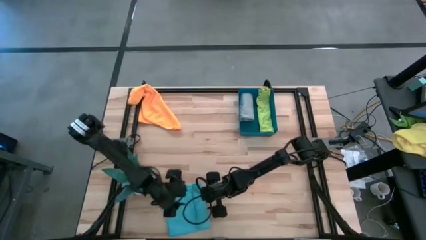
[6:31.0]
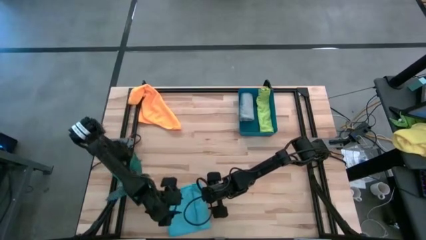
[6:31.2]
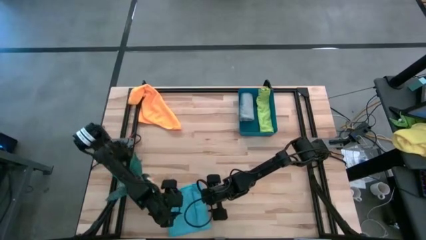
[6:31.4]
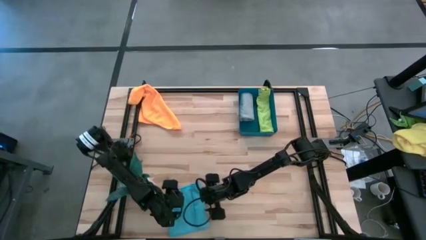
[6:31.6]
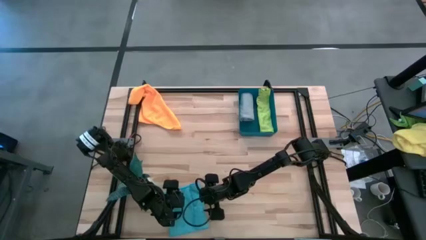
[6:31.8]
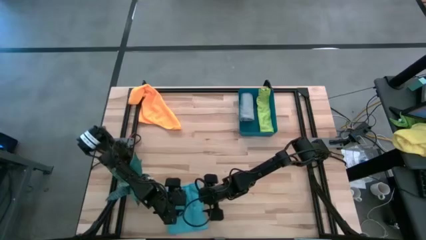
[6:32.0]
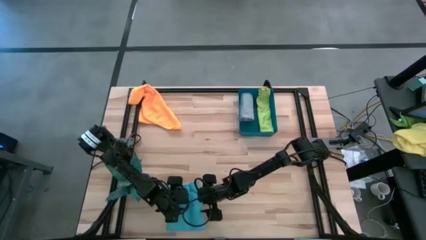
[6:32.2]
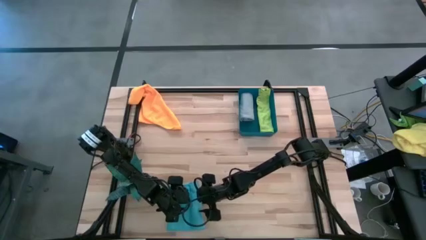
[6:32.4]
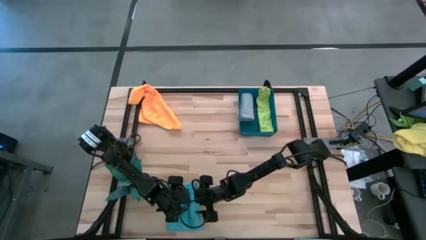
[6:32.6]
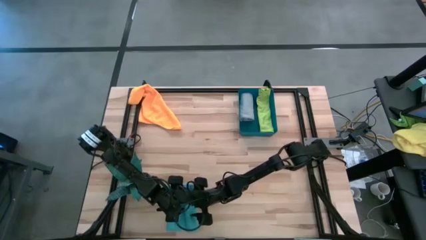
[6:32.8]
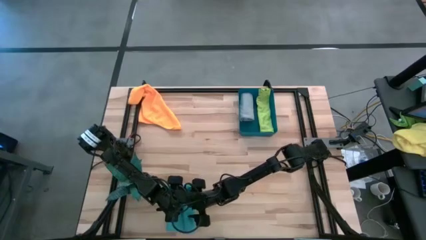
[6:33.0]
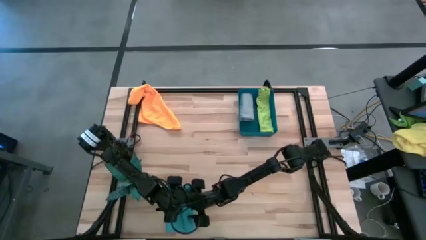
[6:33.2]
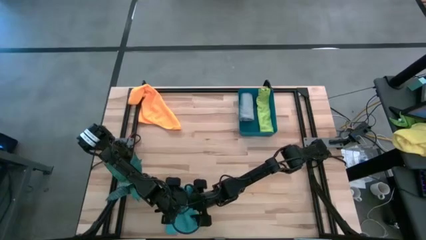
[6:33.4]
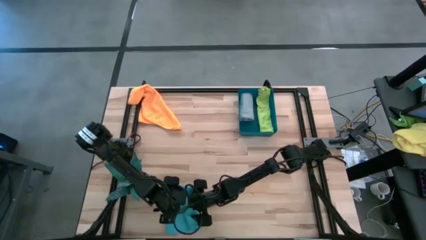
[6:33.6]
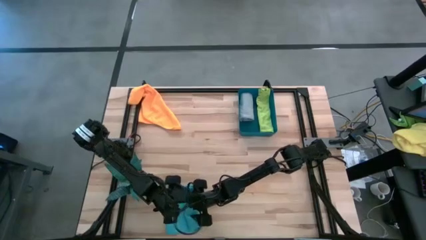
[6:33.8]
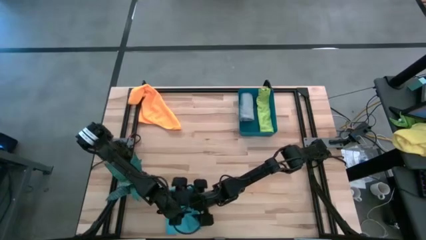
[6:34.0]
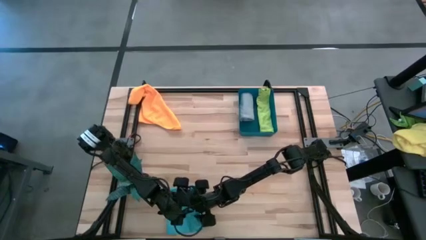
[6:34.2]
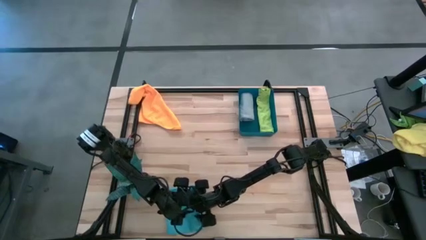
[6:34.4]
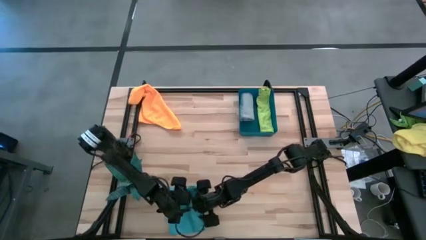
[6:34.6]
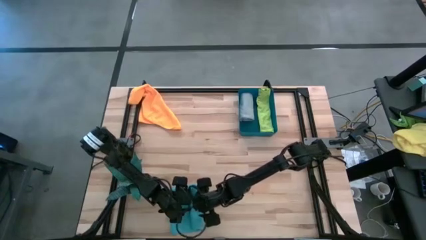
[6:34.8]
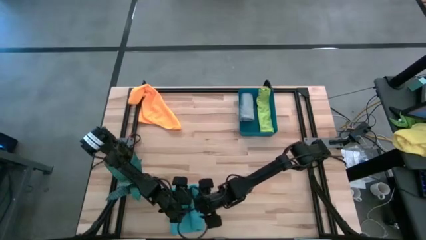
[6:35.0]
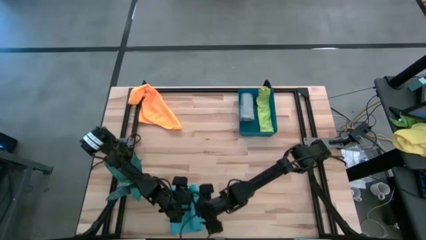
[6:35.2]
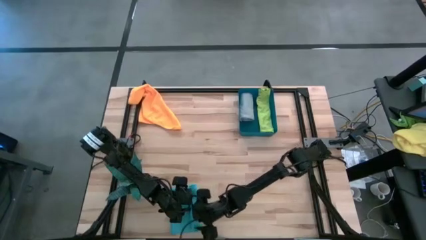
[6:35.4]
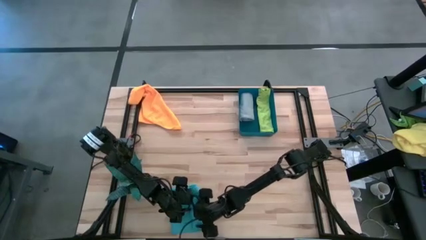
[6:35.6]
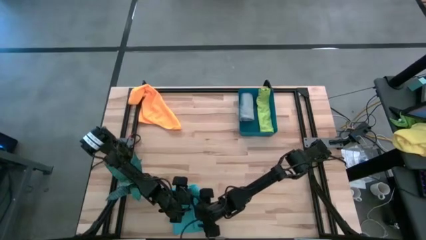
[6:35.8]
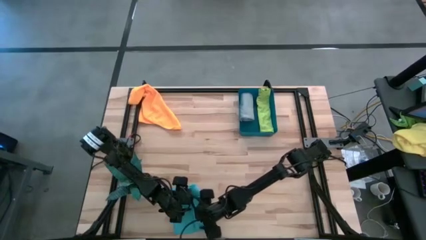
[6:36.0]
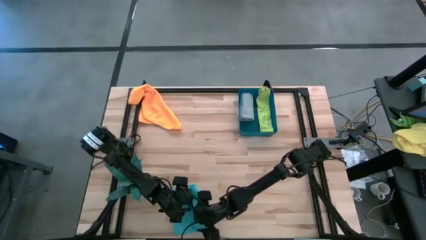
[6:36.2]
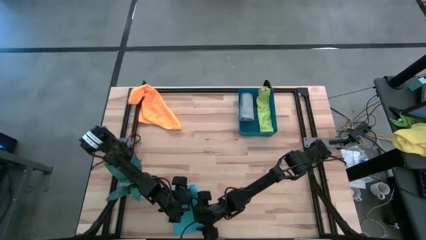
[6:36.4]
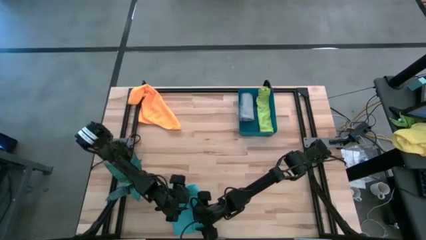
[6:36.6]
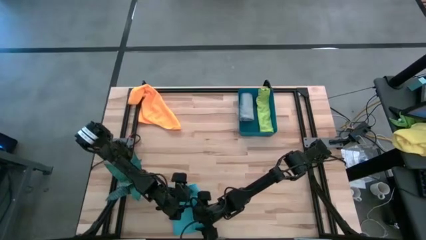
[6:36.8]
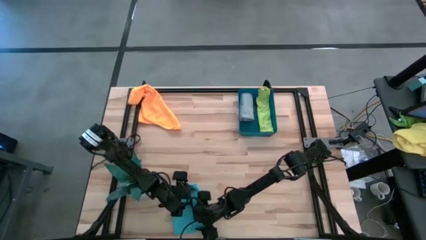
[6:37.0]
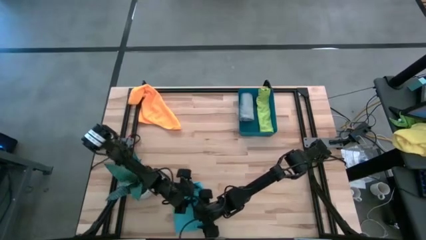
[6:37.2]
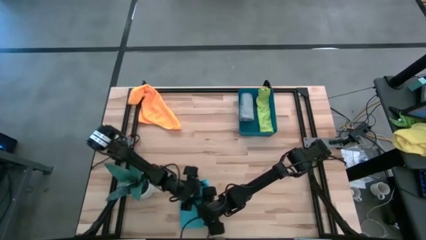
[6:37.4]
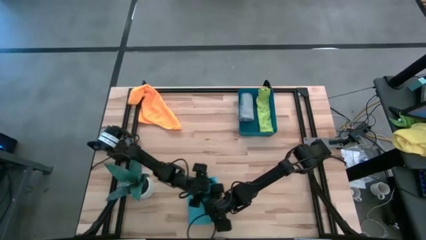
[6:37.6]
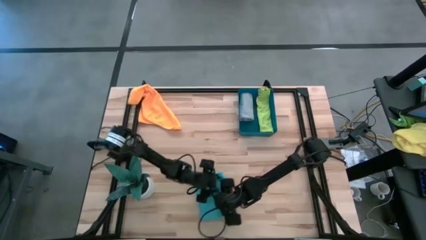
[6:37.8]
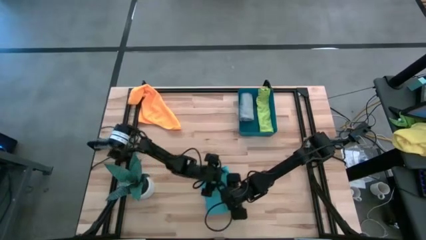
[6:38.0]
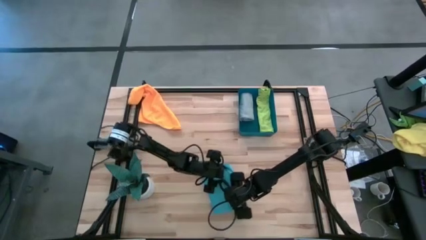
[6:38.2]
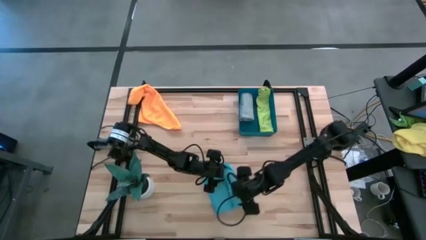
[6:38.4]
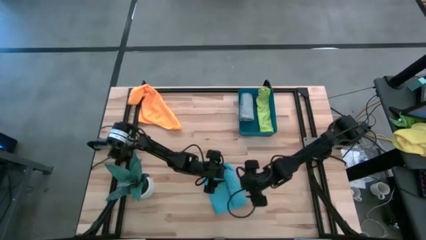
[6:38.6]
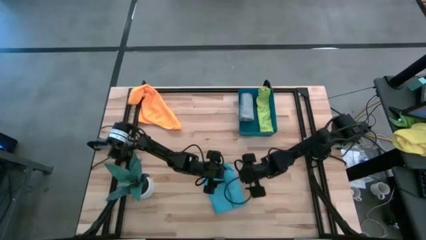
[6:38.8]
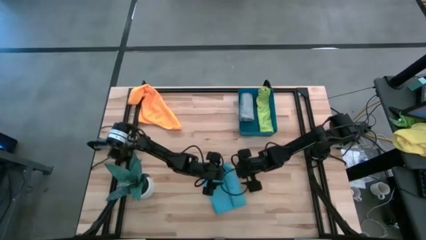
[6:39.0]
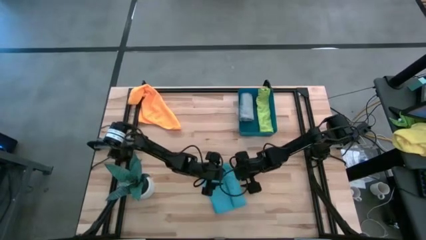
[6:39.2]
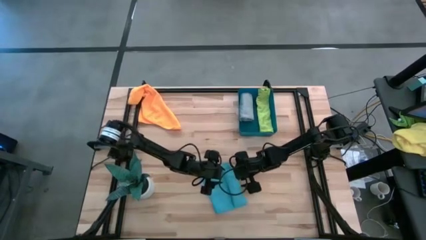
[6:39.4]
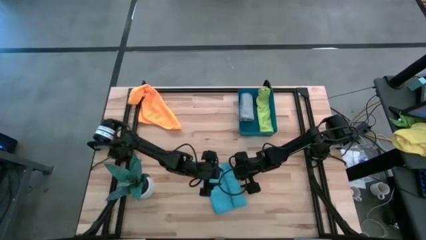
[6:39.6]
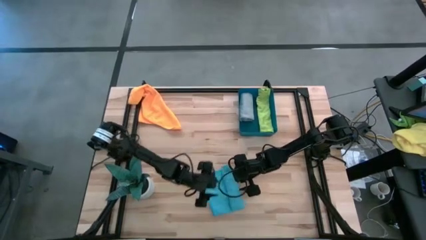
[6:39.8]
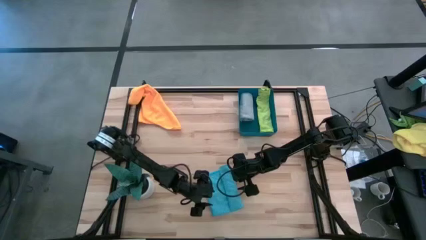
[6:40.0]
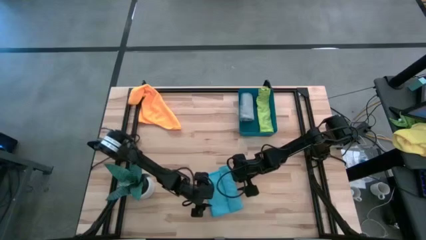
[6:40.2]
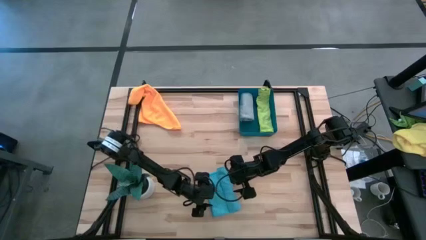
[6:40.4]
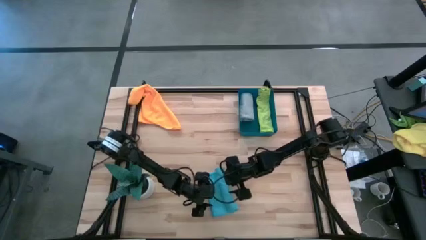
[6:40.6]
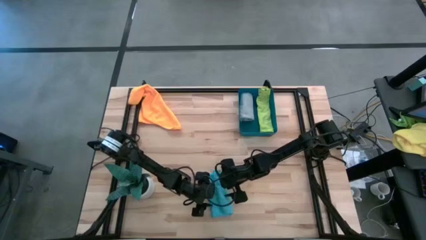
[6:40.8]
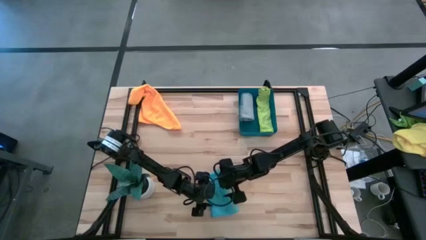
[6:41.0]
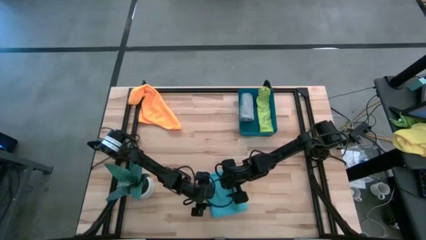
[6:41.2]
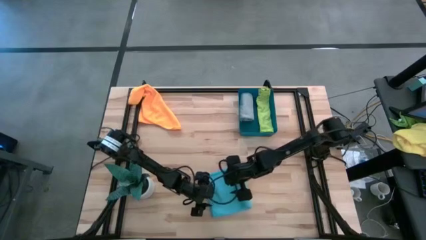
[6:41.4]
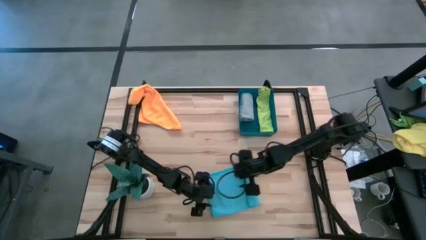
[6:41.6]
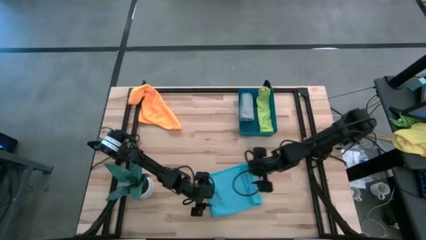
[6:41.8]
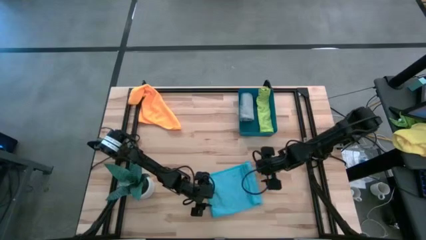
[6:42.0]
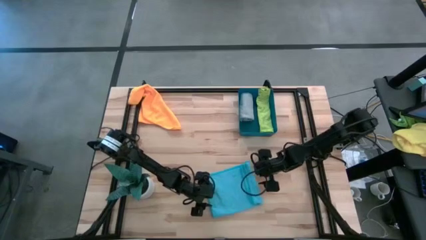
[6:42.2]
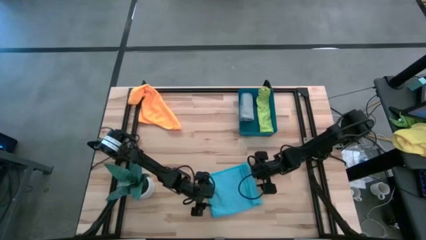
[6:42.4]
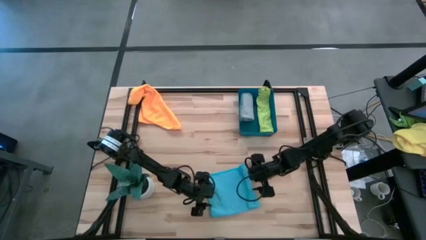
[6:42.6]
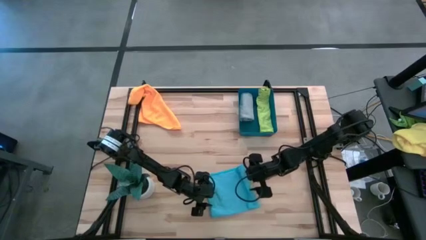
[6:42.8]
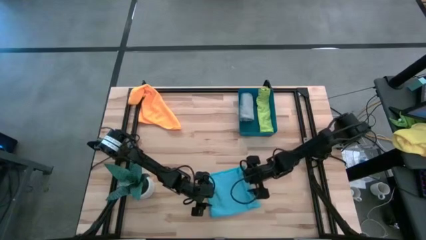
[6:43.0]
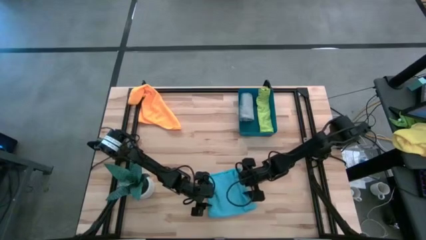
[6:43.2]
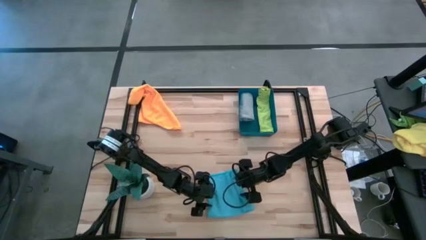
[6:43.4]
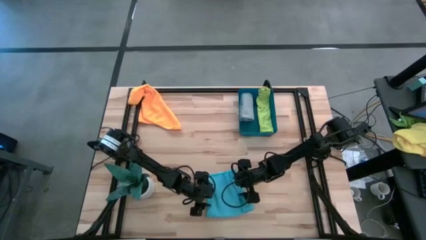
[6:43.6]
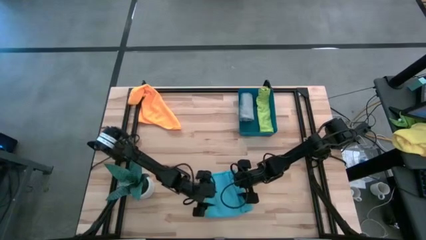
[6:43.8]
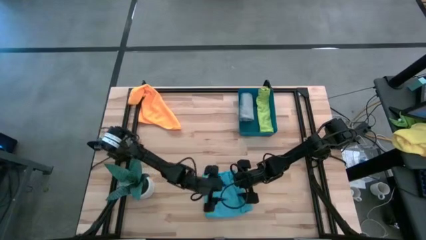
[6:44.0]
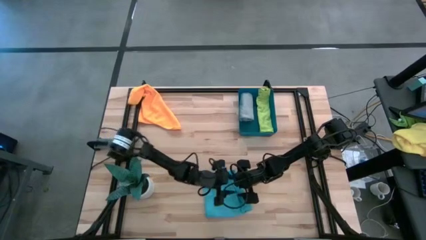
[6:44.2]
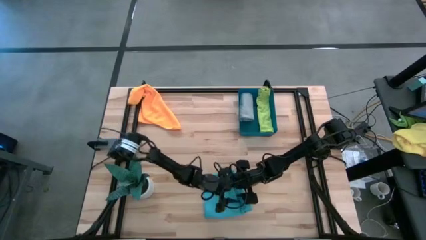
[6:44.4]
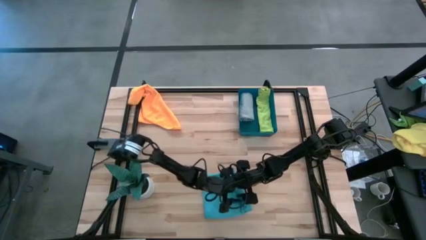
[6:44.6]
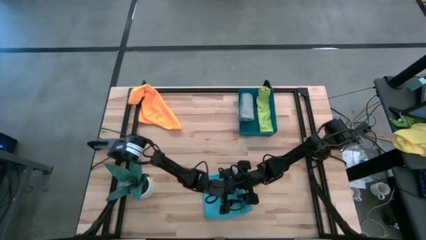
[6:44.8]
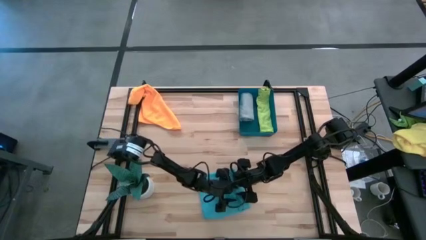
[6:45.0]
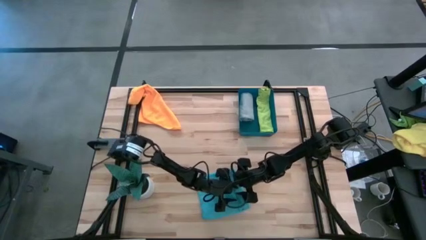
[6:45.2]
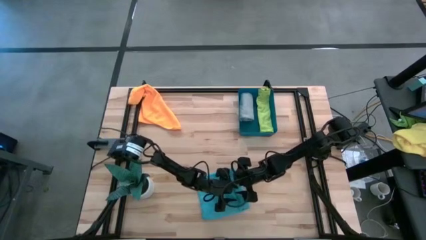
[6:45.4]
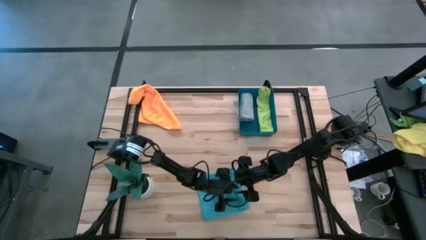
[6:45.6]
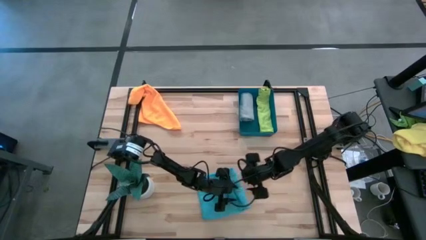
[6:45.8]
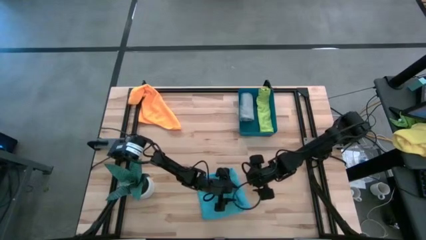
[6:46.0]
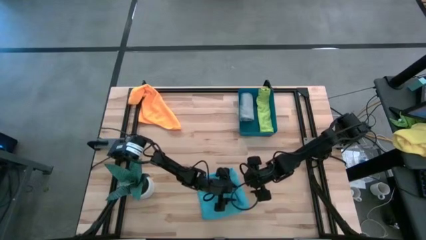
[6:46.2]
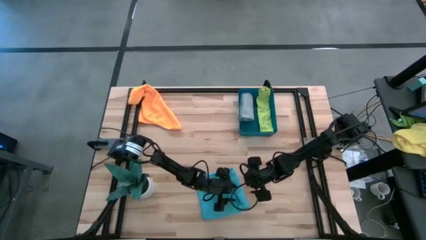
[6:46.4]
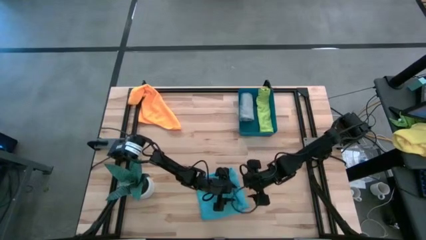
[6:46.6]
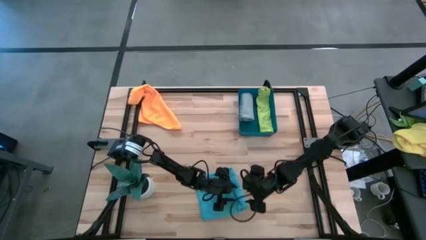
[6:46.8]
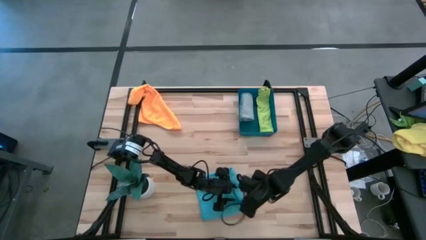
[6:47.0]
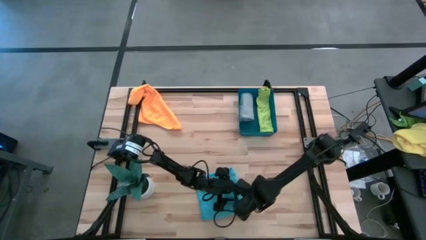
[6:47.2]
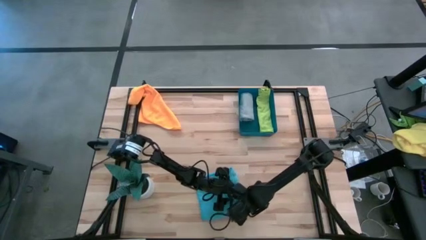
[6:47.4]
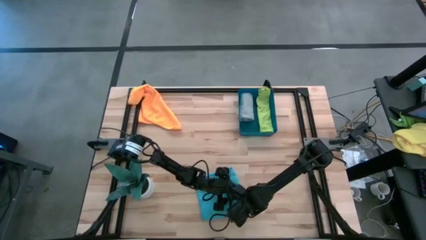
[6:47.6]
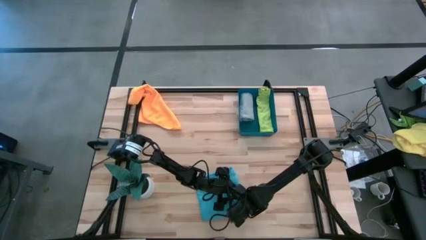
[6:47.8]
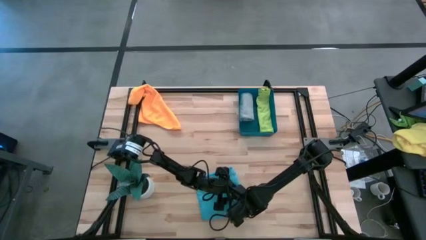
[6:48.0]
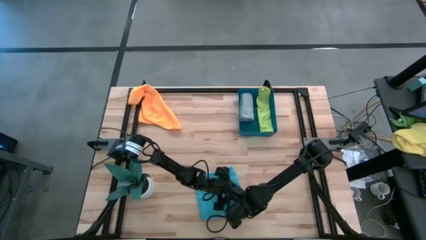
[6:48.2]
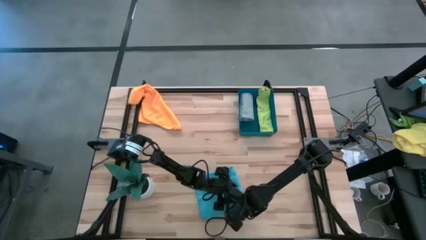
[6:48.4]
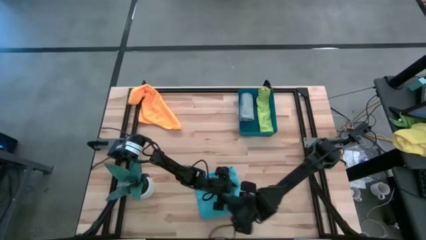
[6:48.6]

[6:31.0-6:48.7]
Task: Roll microfiber towels into tight, uniform cylinder then place into a basket
Roll the blue towel
